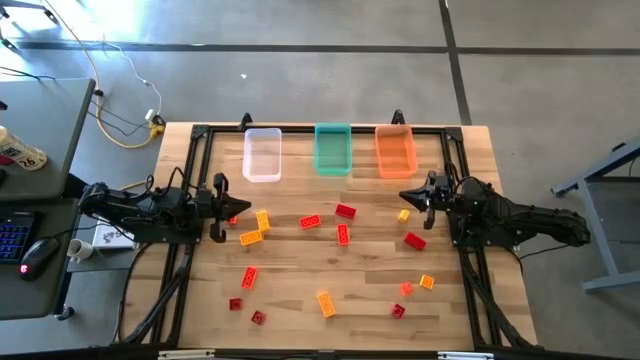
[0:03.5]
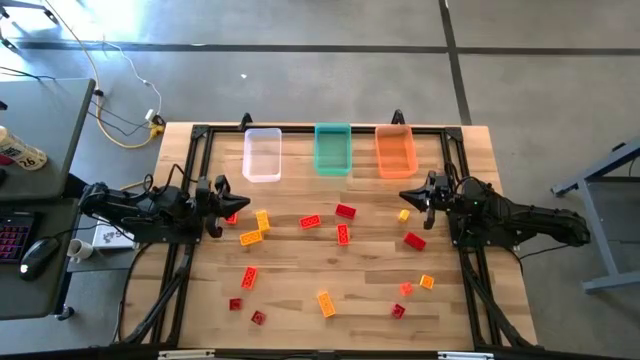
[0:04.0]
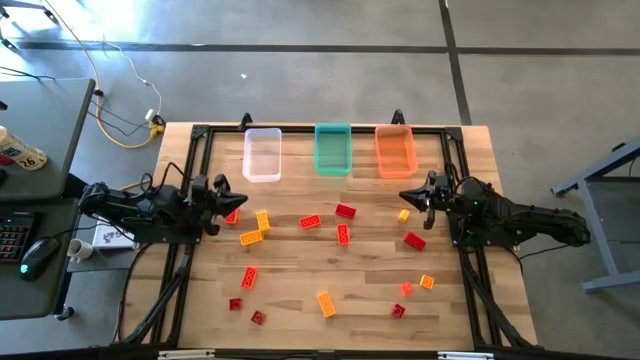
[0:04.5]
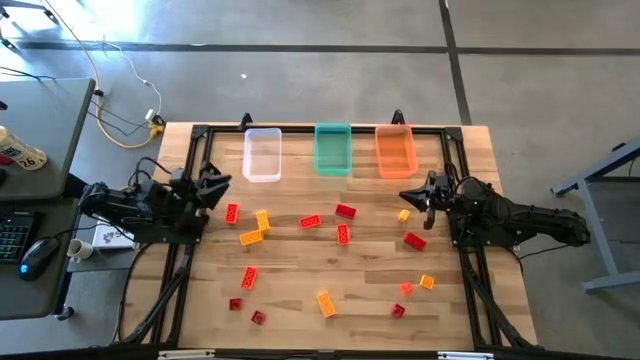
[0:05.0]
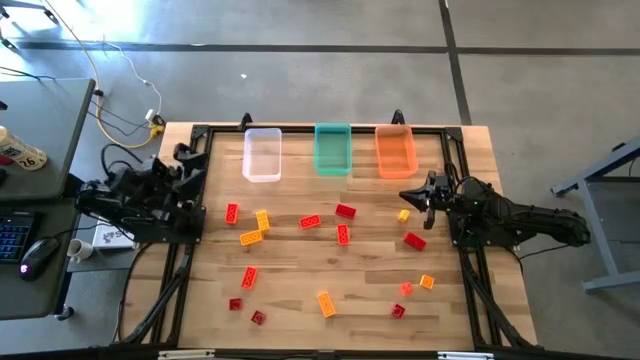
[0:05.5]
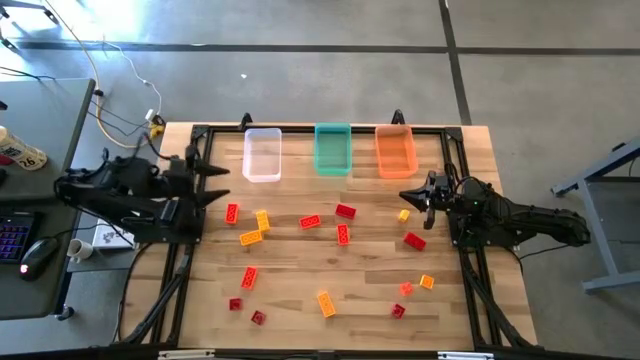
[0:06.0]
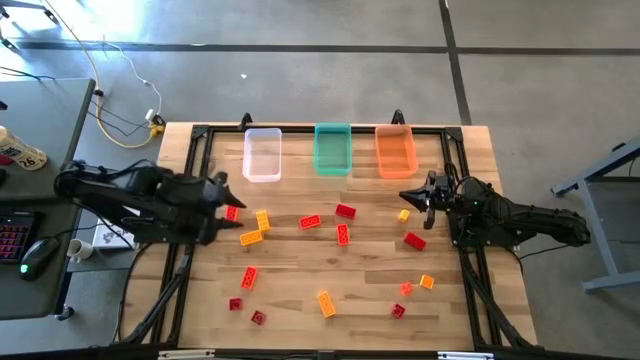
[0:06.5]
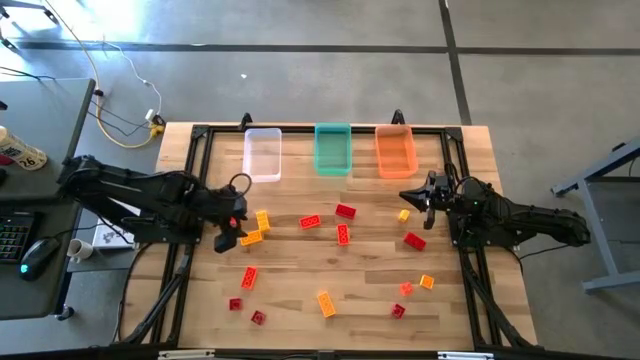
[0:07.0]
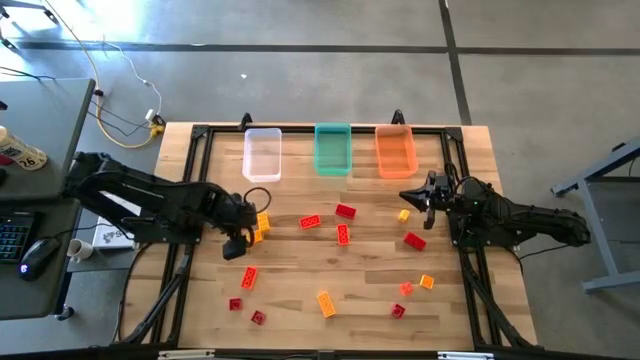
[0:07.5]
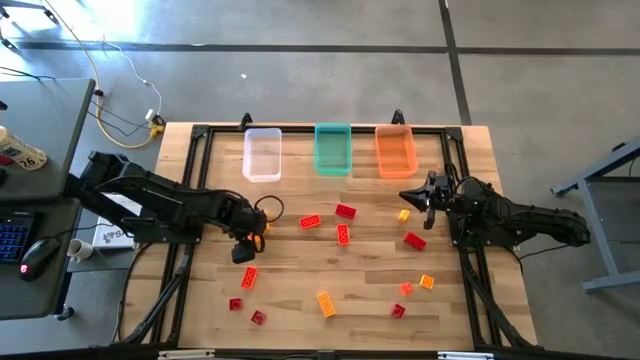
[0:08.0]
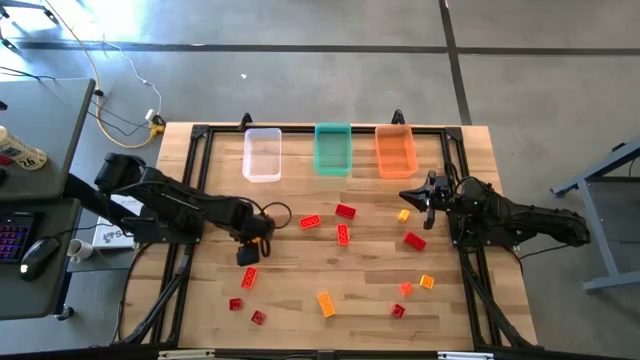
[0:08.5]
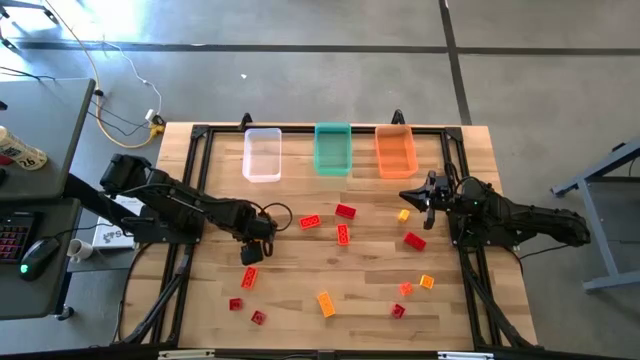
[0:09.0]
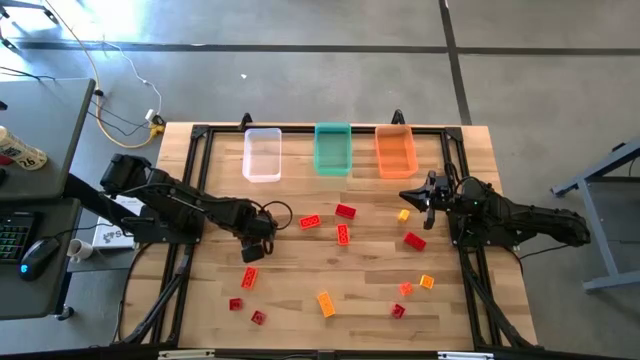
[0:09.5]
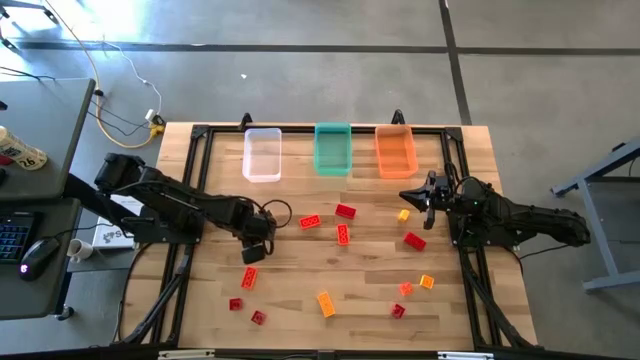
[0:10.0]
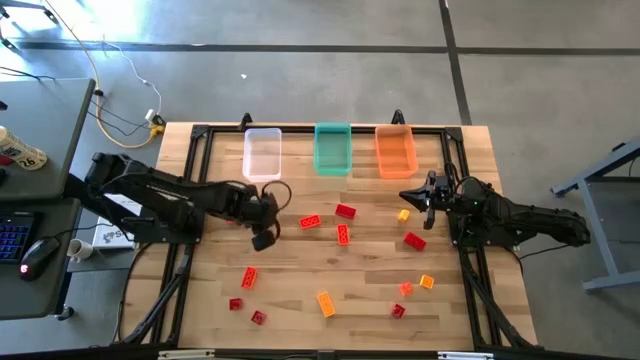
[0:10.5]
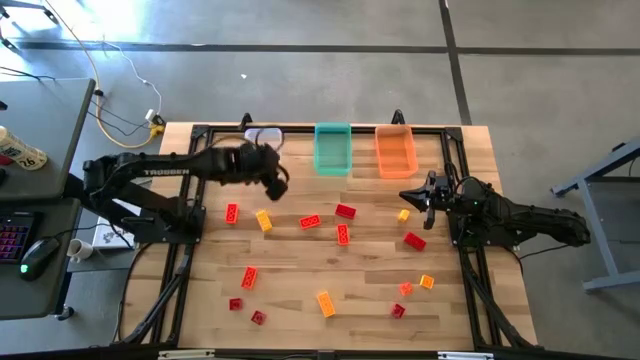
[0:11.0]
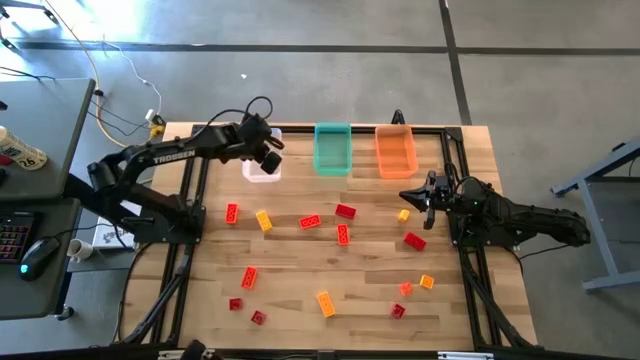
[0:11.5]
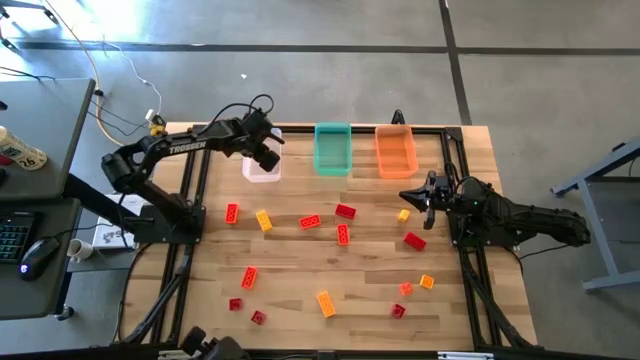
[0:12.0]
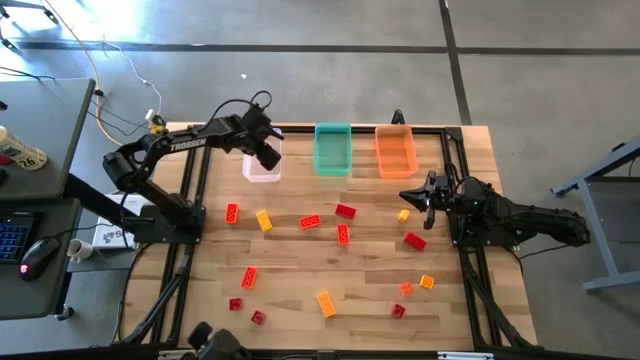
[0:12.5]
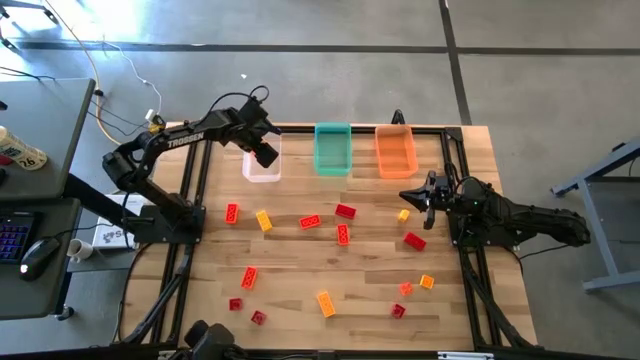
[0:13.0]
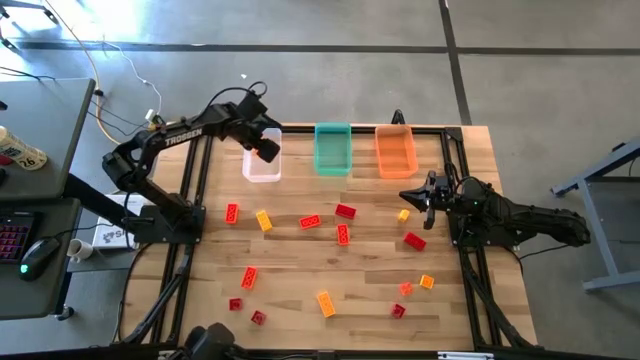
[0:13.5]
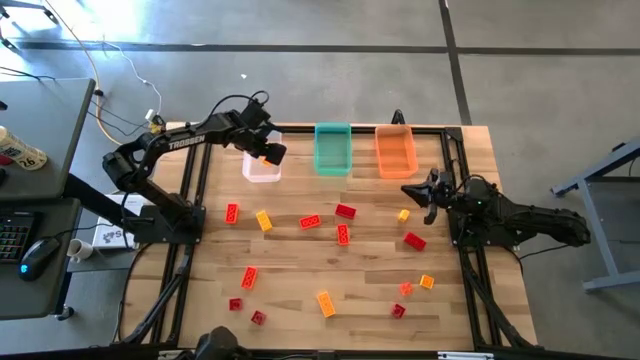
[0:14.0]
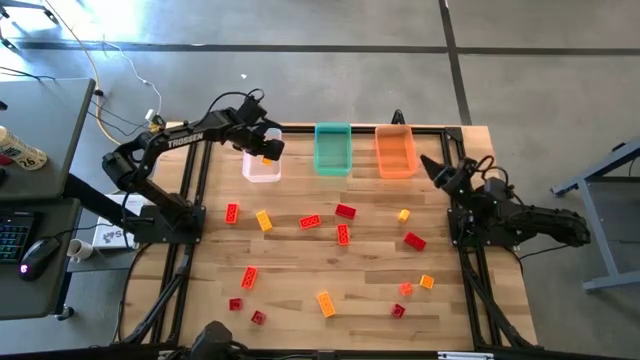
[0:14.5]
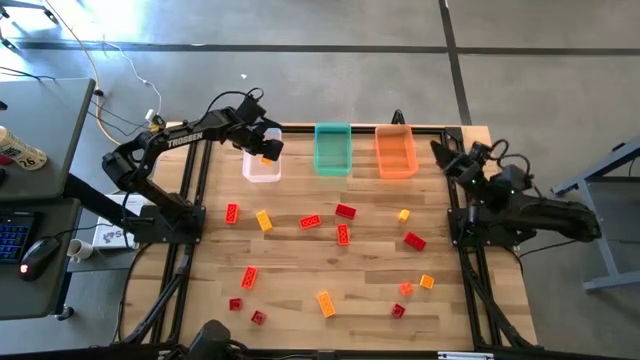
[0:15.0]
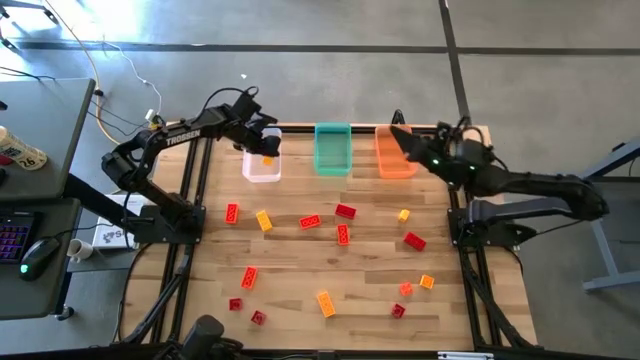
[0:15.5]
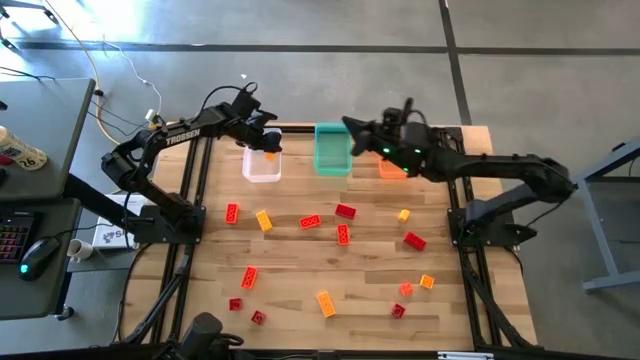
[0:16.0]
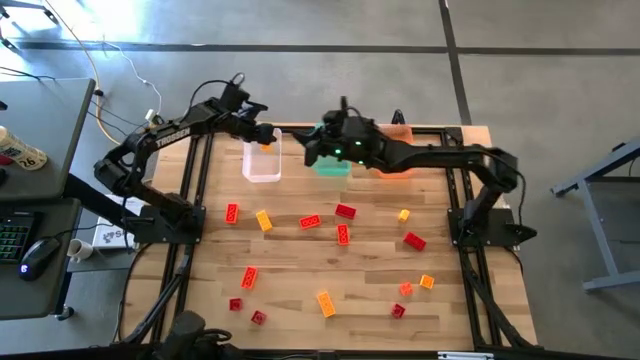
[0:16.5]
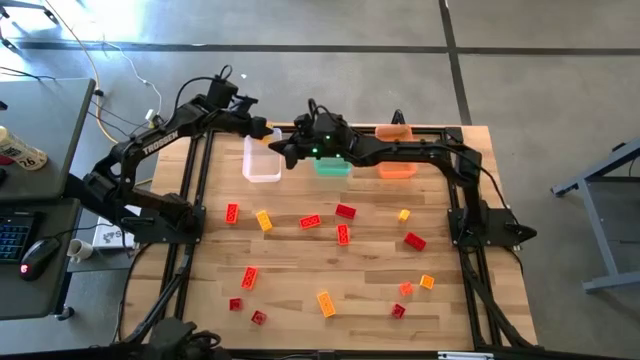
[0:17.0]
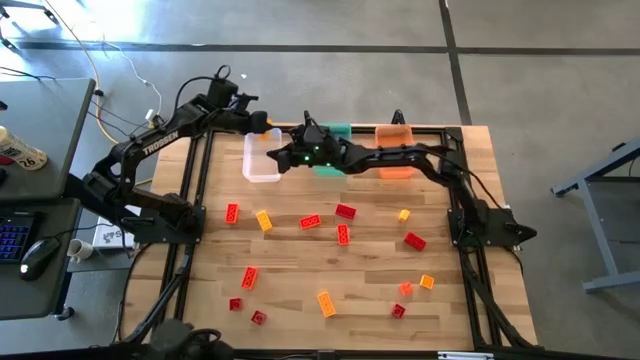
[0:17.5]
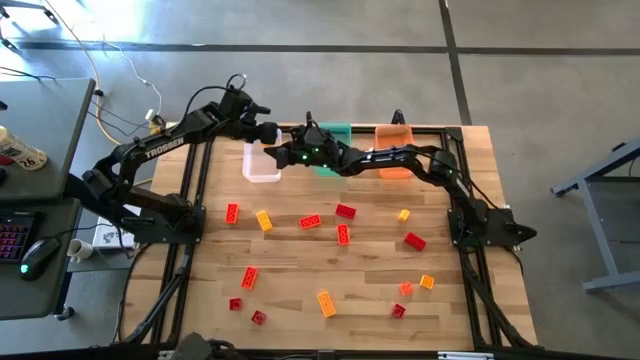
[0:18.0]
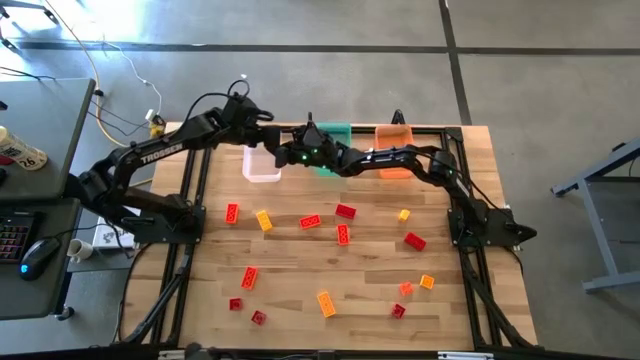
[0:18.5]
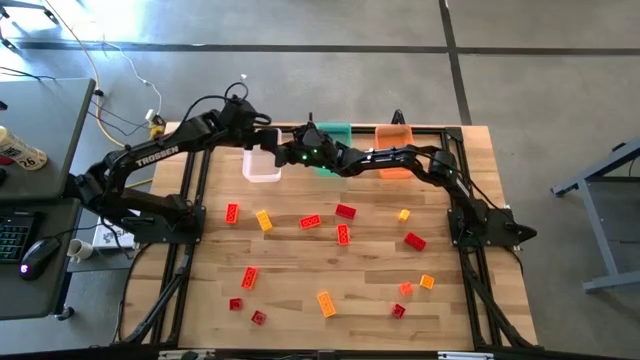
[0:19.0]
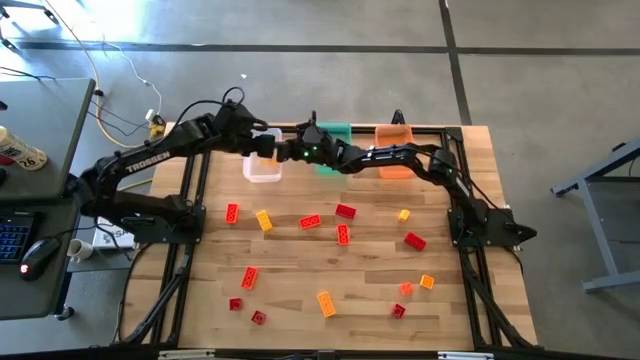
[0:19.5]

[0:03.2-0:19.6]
Task: Sort & place blocks by color
Put the yellow game piece into the transparent bin

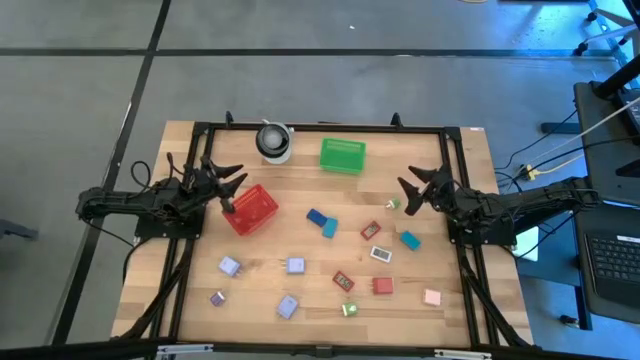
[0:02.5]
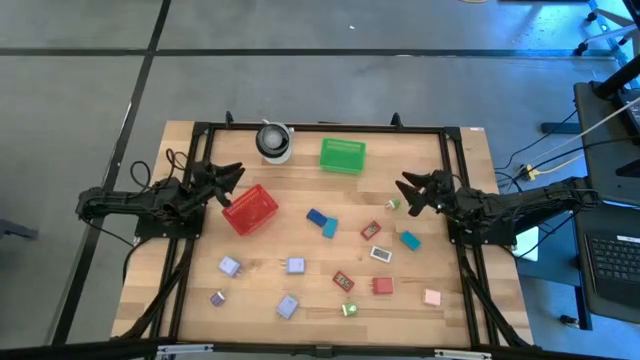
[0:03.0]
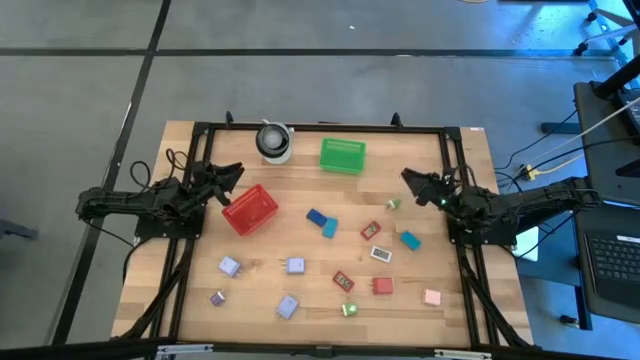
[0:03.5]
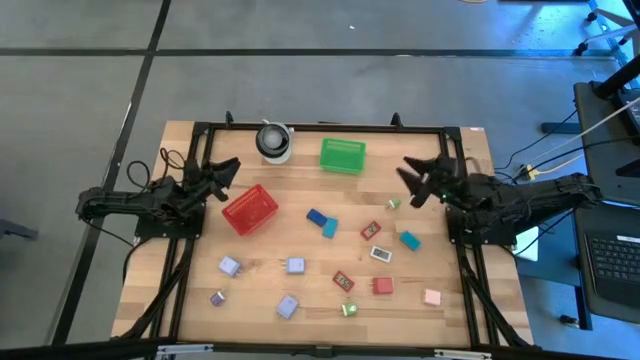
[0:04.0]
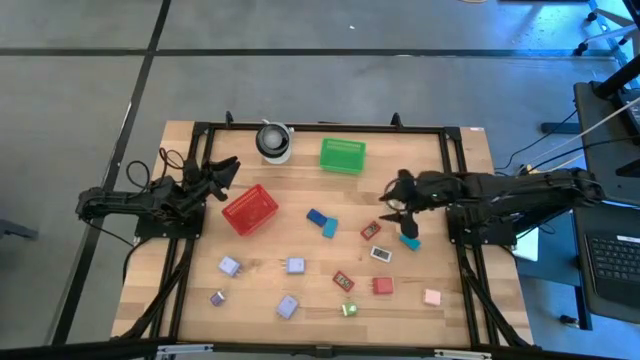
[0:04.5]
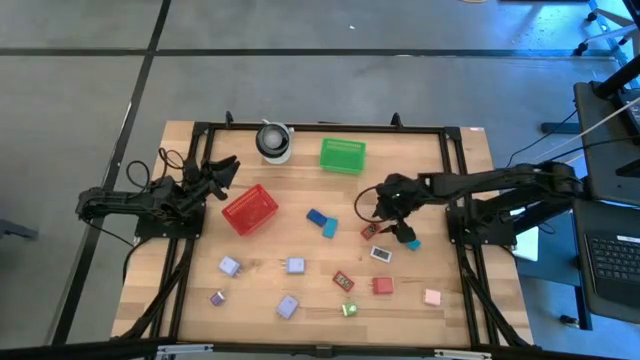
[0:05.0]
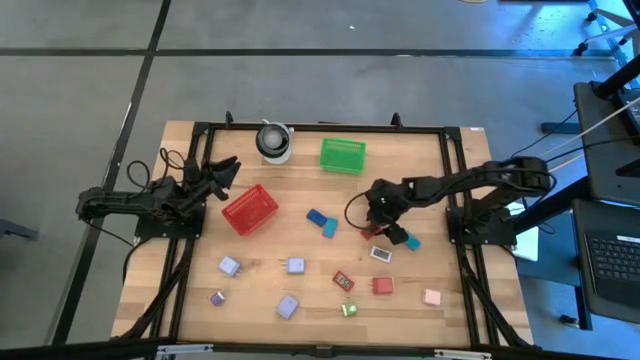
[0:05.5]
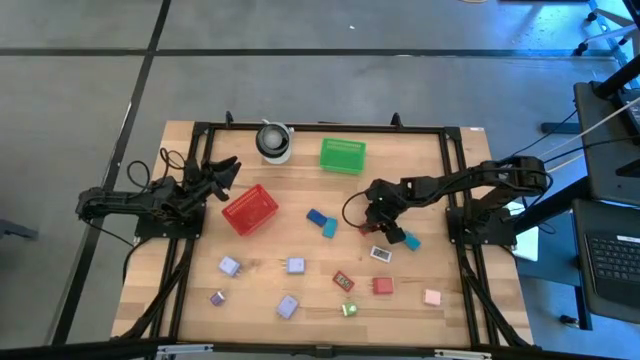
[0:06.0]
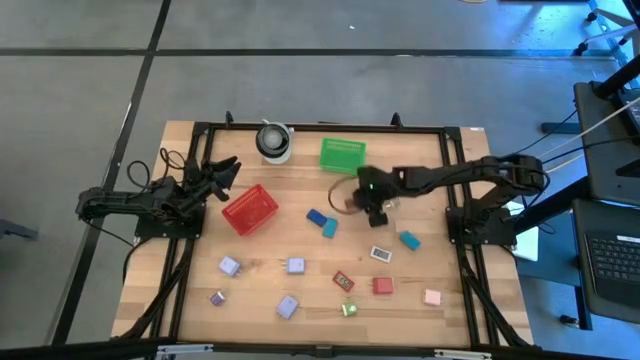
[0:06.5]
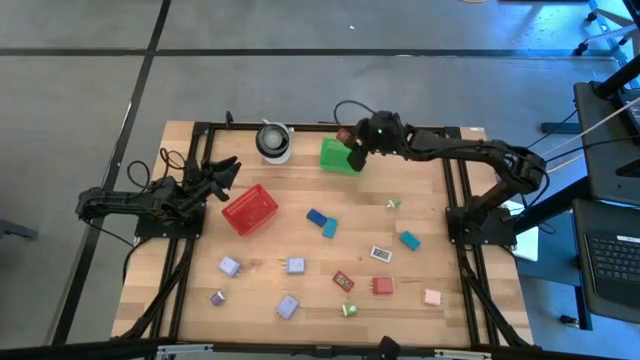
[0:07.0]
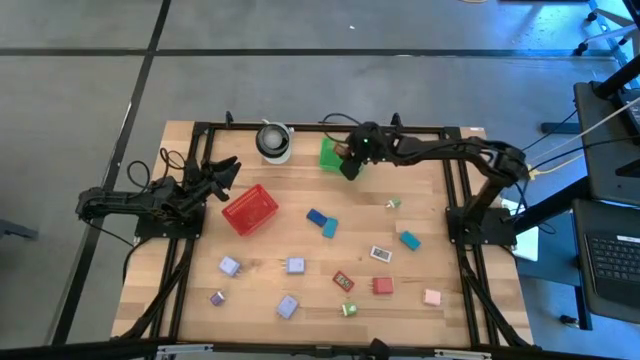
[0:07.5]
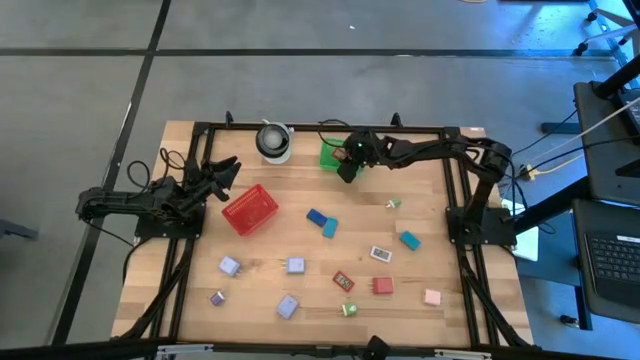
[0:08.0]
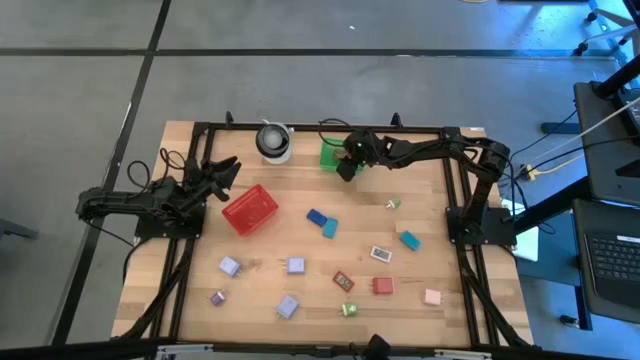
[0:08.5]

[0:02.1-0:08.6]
Task: Pick & Place Office items
Put the top red digital clock into the green bin
